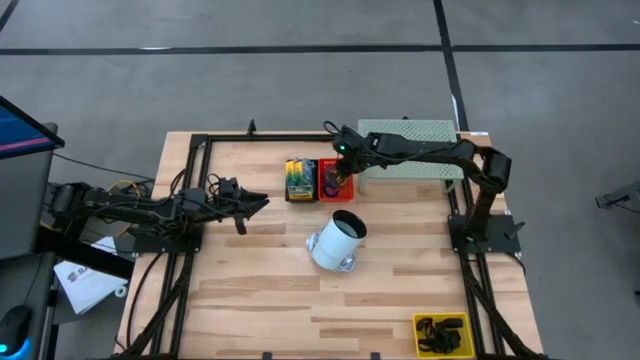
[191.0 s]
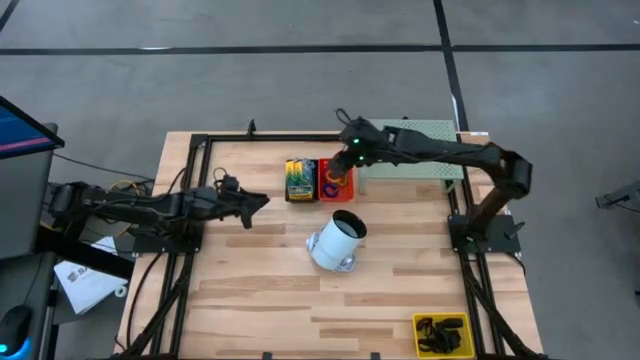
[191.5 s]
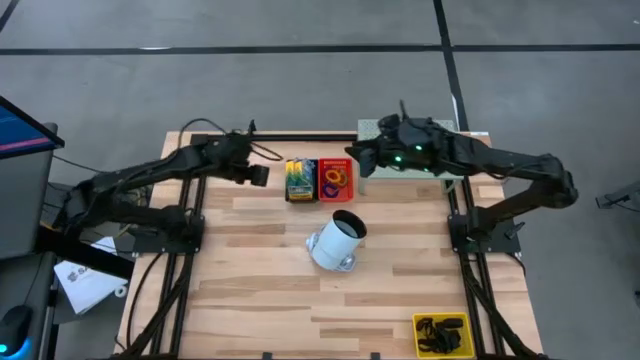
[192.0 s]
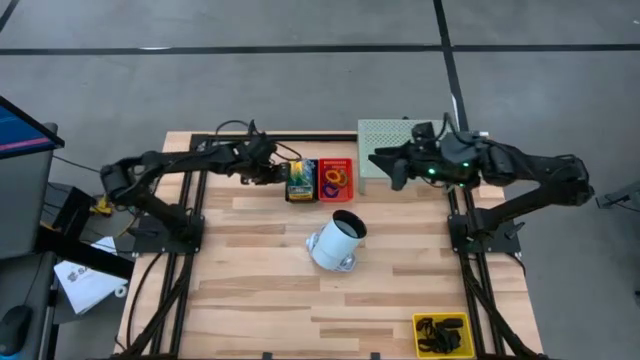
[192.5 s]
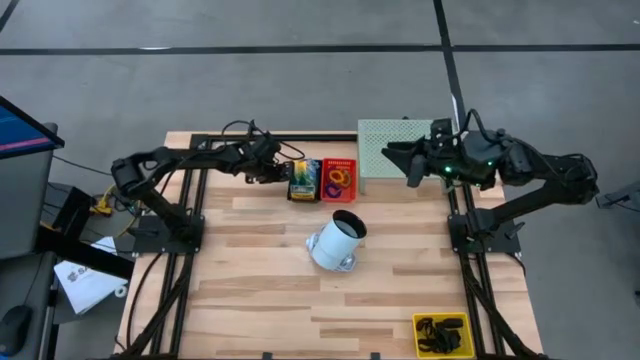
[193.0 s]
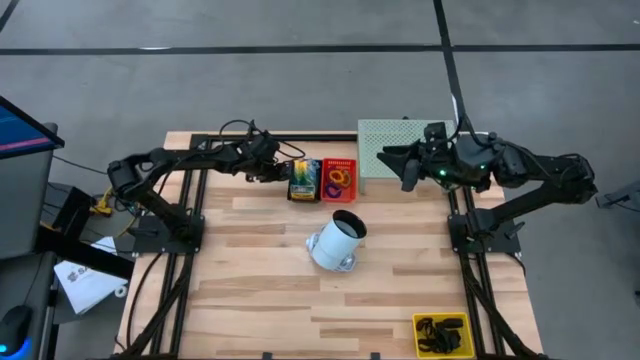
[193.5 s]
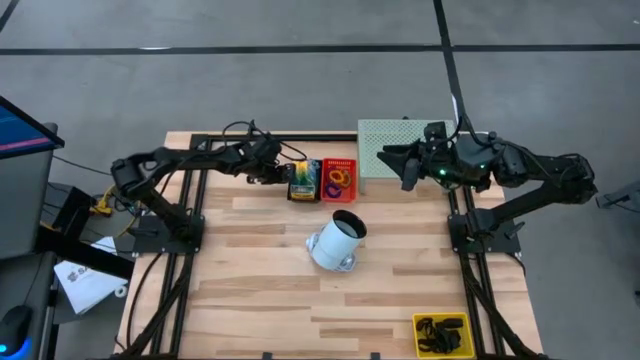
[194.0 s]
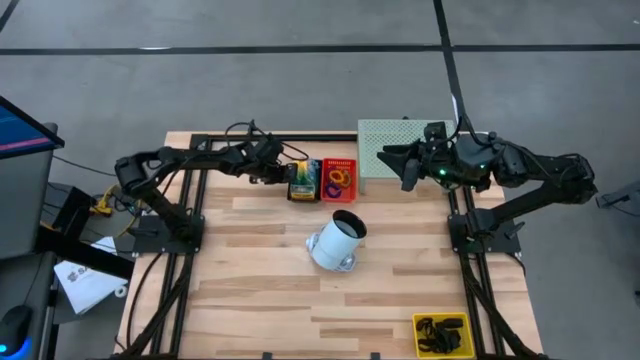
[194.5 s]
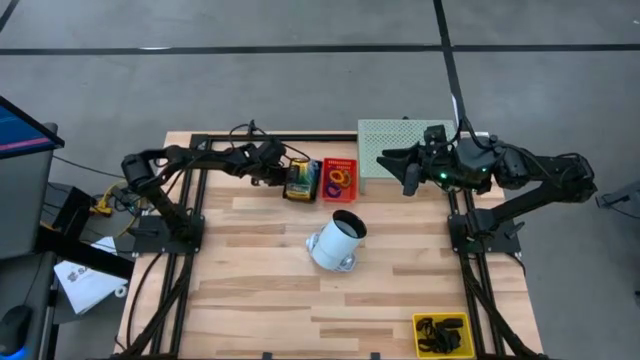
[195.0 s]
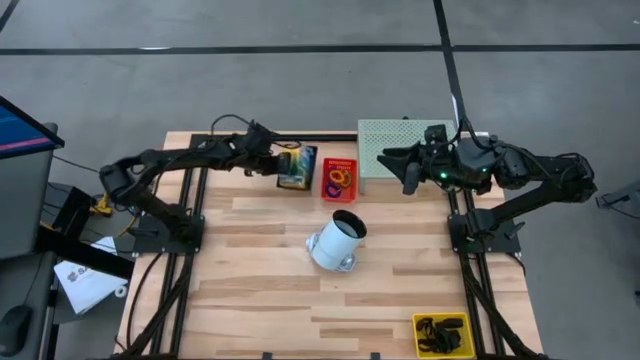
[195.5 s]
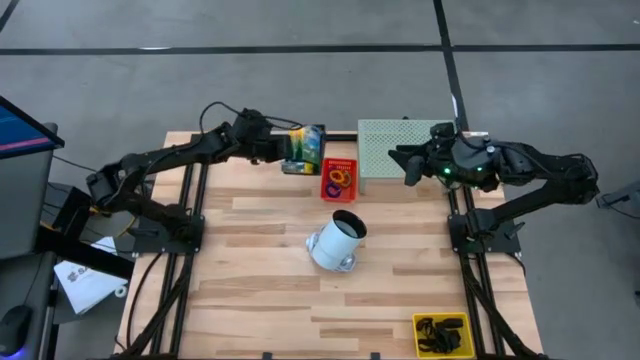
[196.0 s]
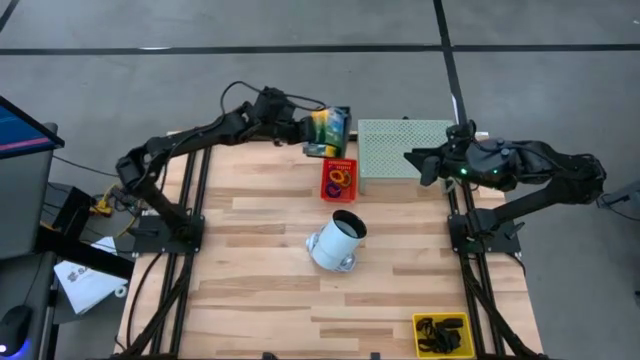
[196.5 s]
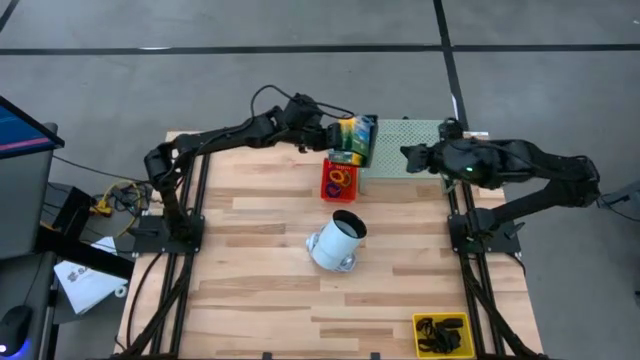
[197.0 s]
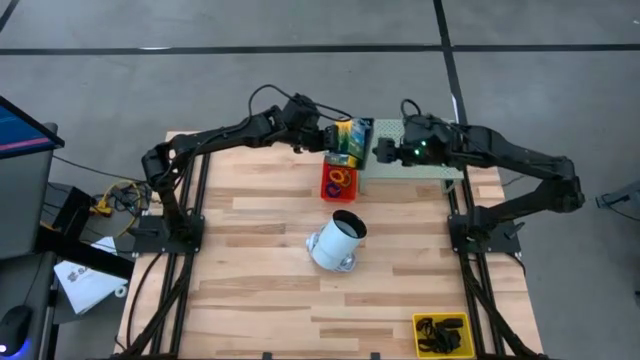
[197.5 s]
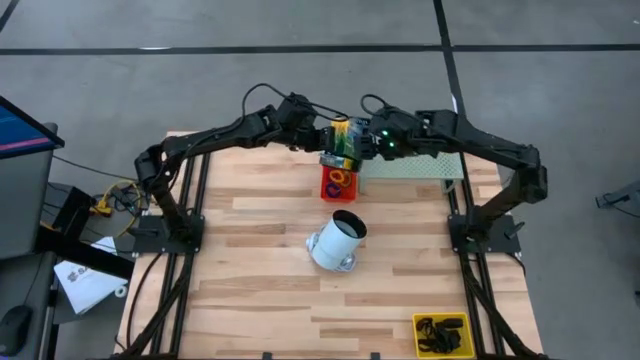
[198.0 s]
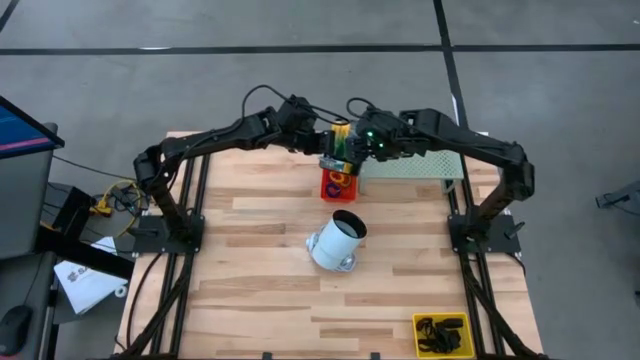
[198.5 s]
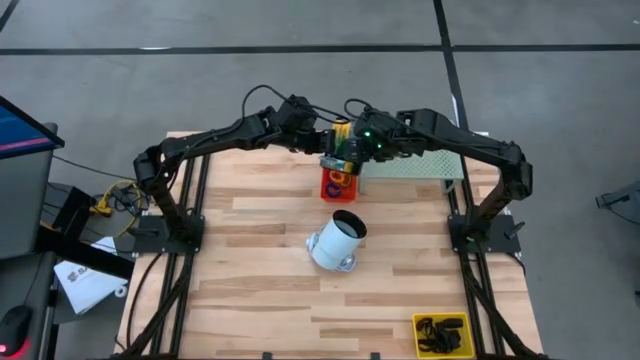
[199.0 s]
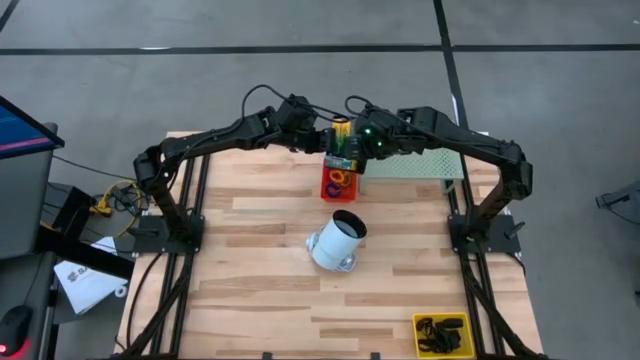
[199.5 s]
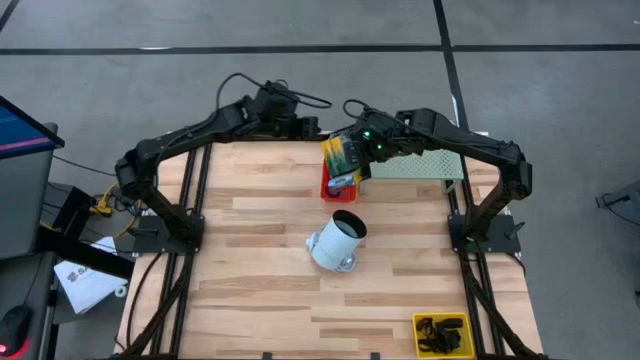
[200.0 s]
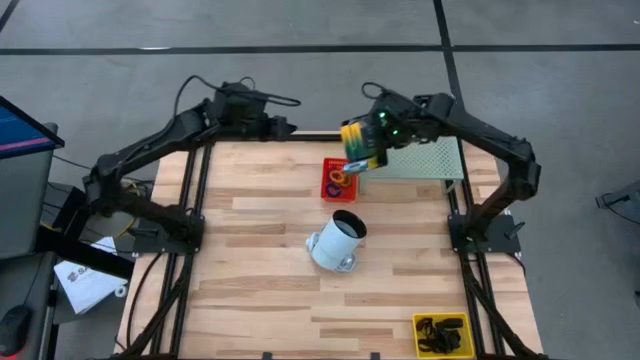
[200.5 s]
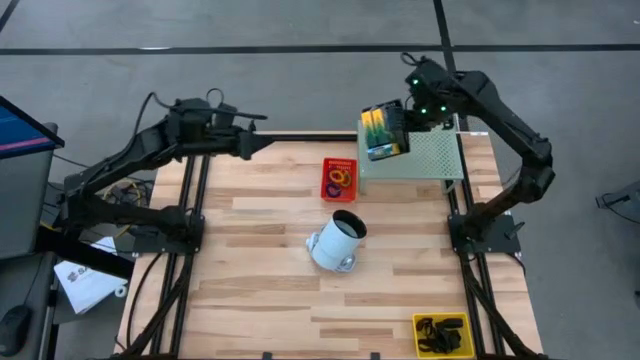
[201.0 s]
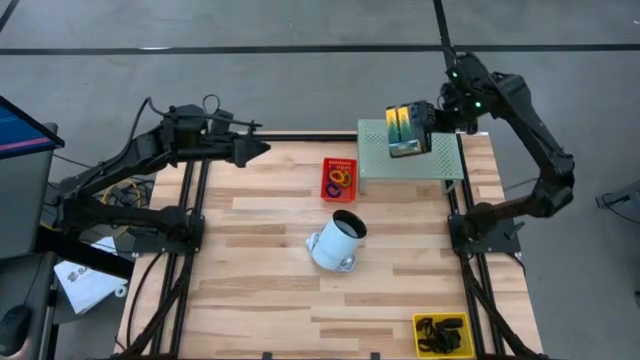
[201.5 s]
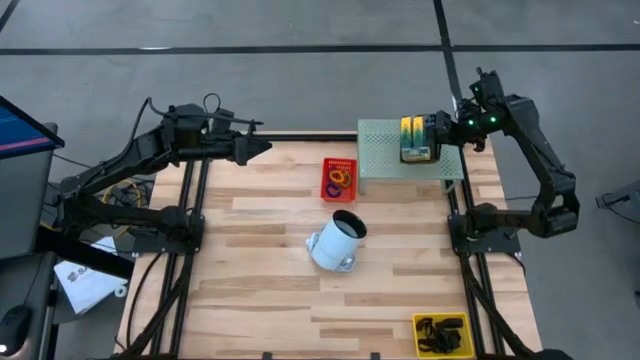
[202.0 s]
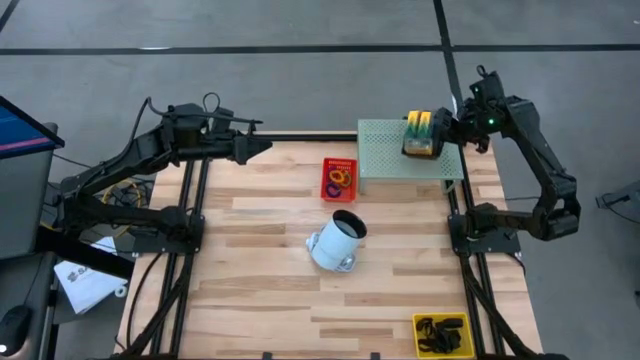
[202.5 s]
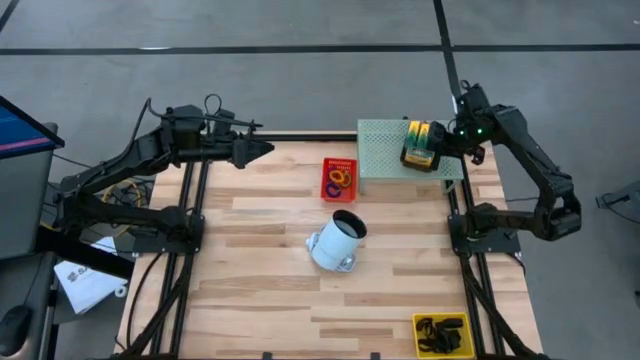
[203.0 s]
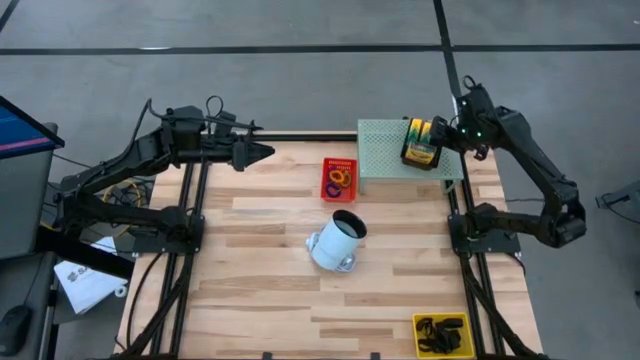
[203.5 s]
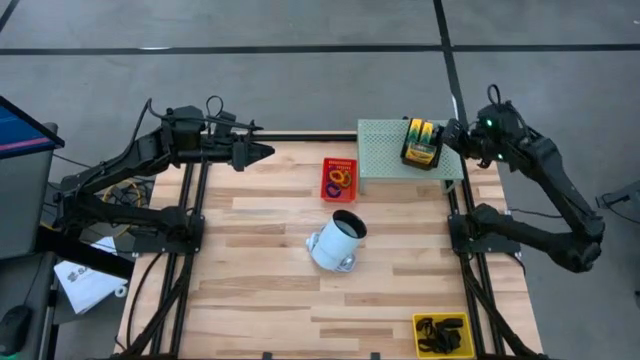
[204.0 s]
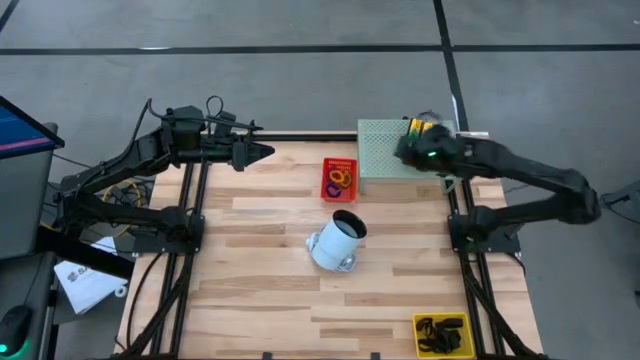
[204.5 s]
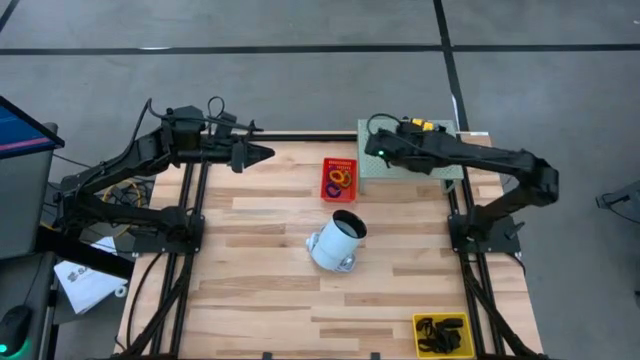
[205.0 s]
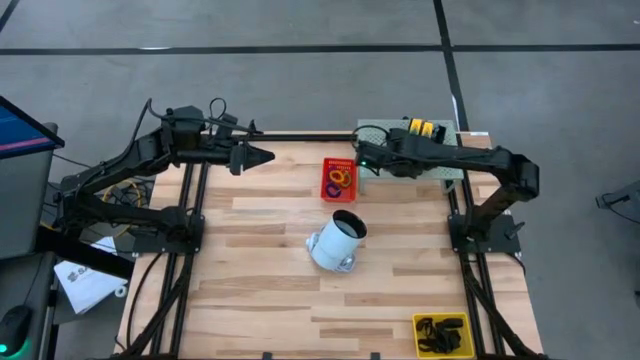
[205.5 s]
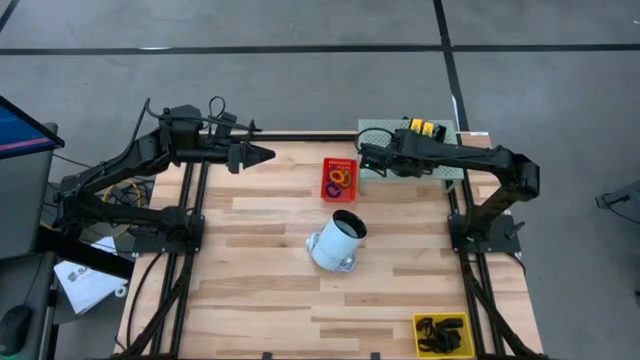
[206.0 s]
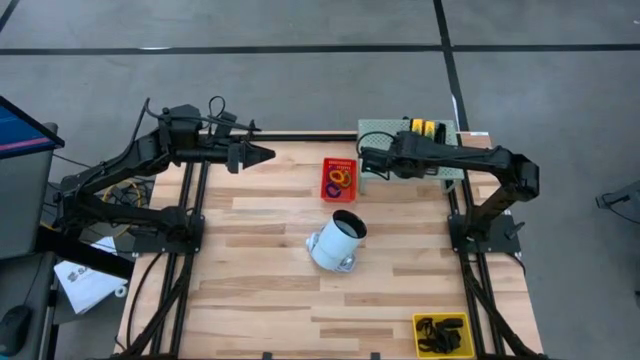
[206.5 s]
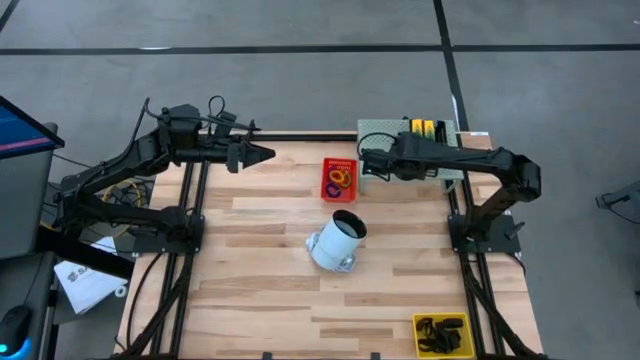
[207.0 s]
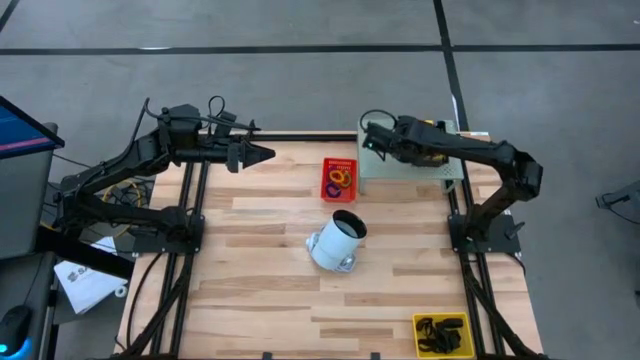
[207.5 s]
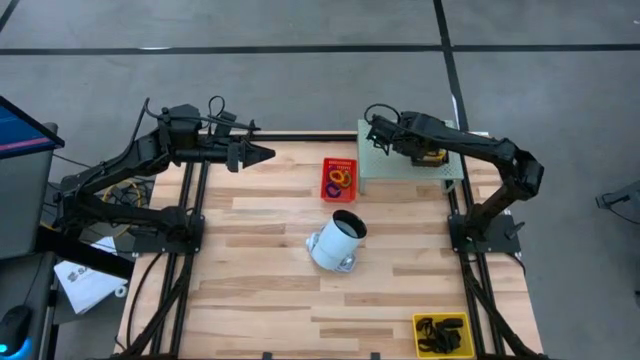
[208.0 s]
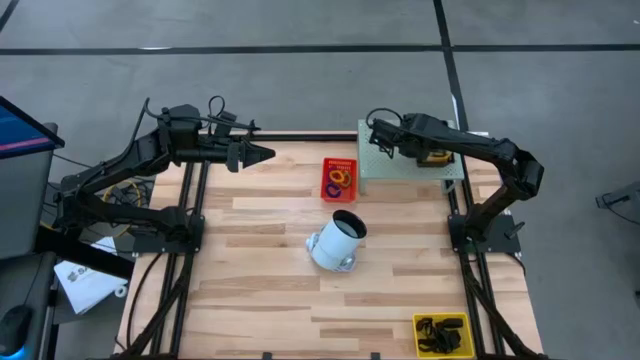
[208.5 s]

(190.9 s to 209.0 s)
Task: Pick & Place Office Desk Supplies
Put the black bin on the shelf

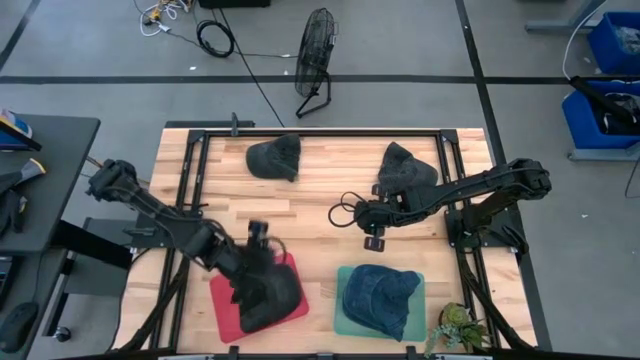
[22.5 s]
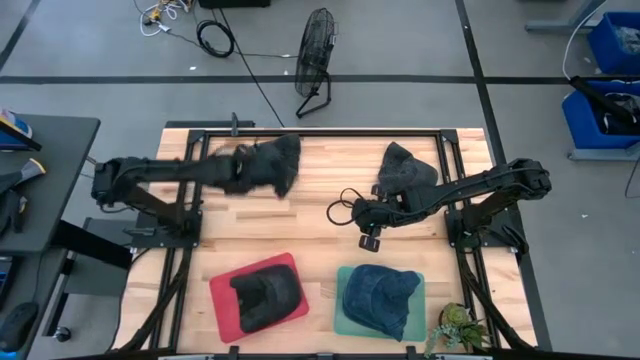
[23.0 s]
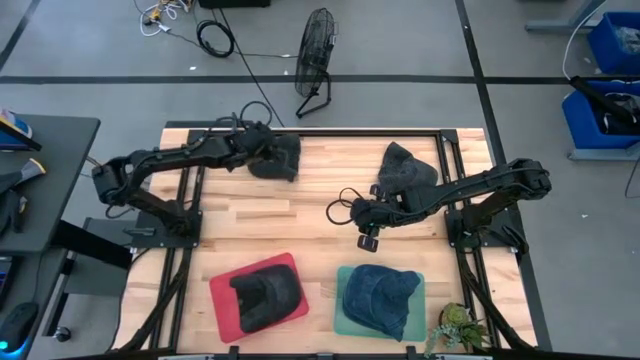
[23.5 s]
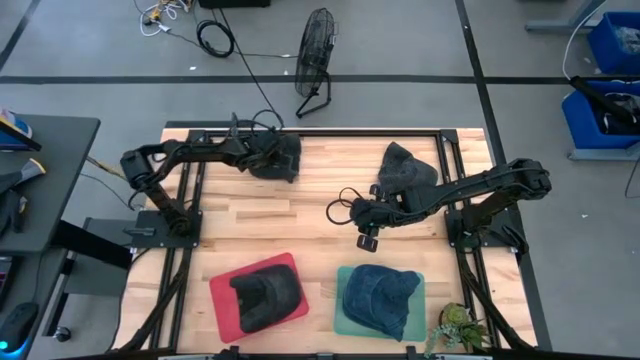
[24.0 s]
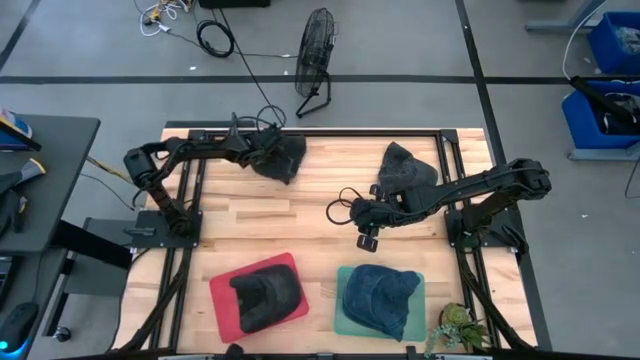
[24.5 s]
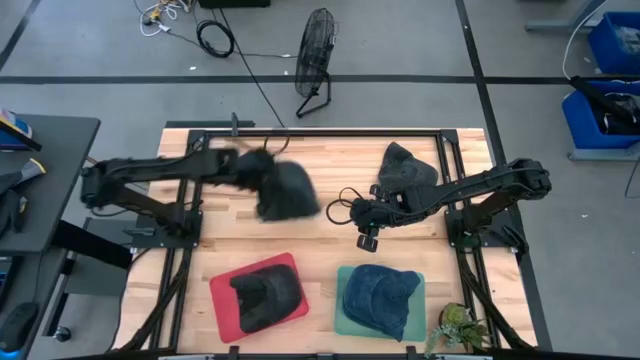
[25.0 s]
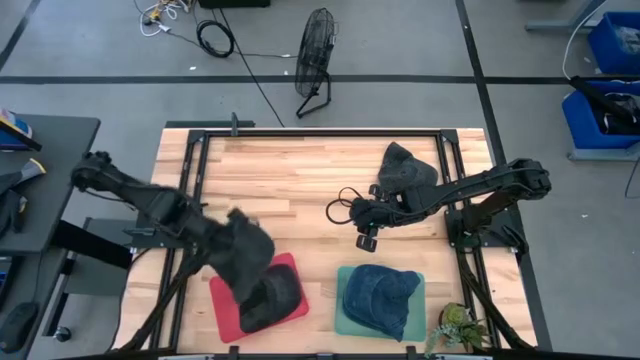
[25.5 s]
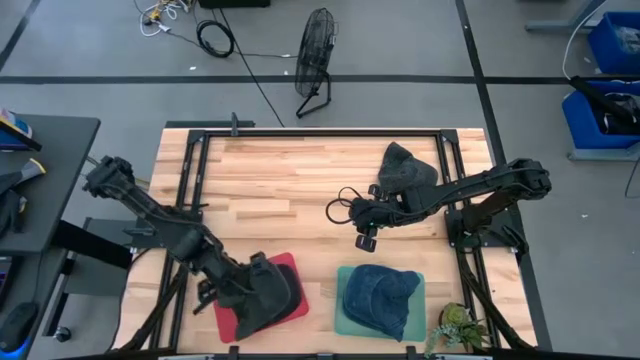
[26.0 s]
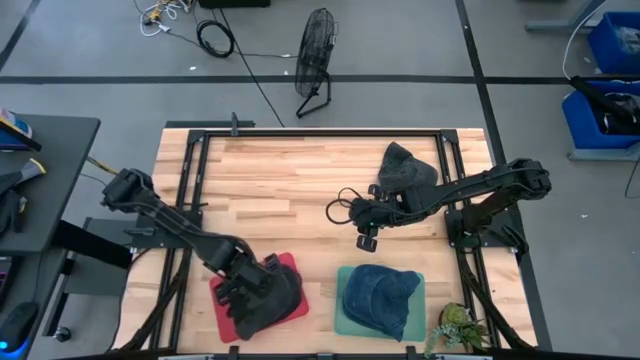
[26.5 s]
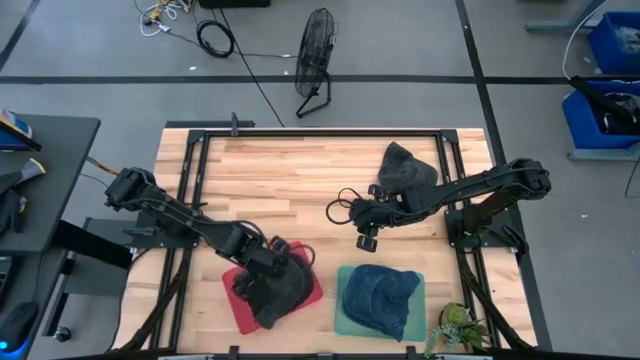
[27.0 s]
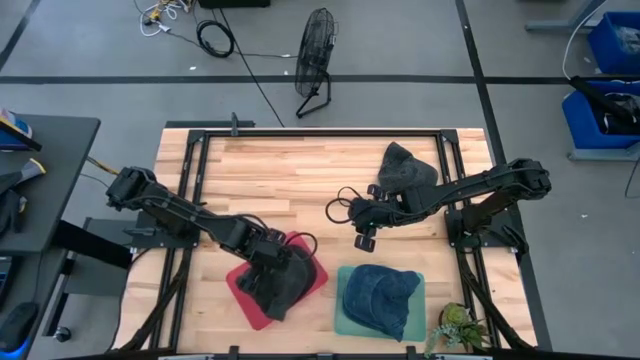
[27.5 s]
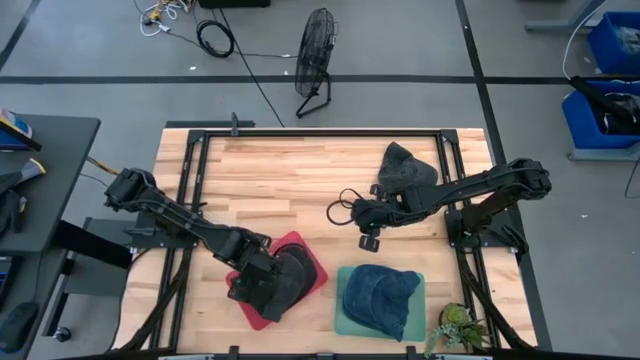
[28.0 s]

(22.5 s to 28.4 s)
Task: Pick & Place hat
Put the black cap into the red bin
